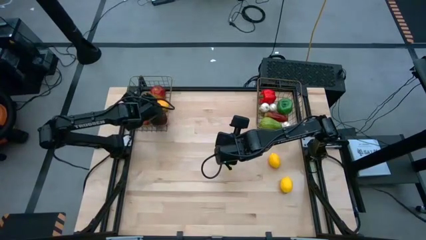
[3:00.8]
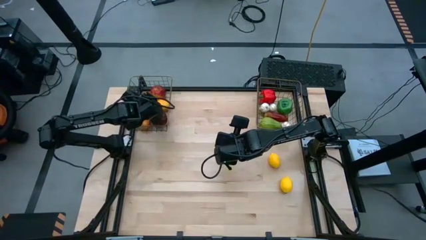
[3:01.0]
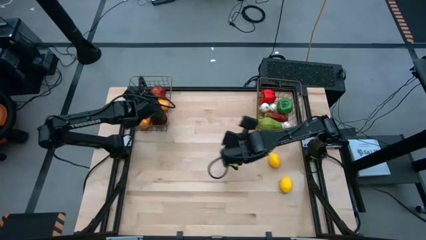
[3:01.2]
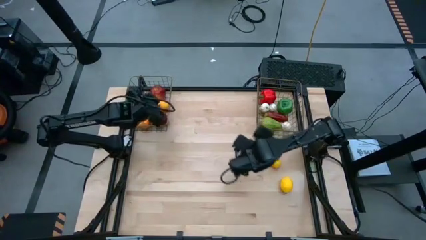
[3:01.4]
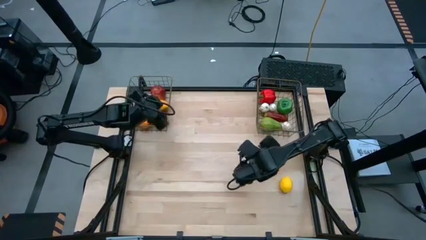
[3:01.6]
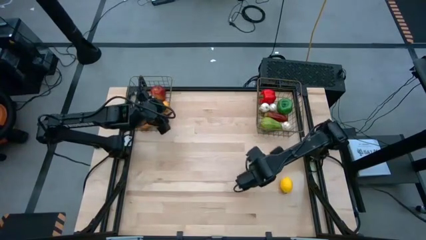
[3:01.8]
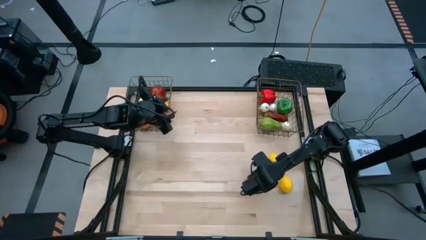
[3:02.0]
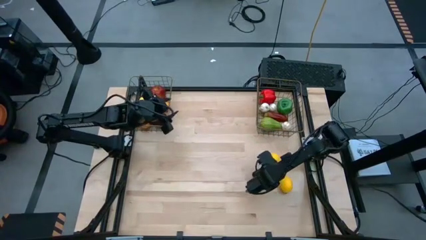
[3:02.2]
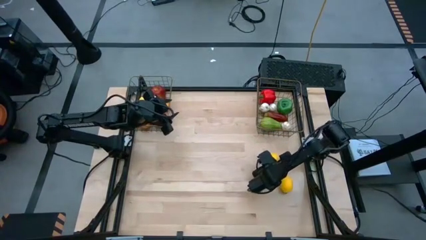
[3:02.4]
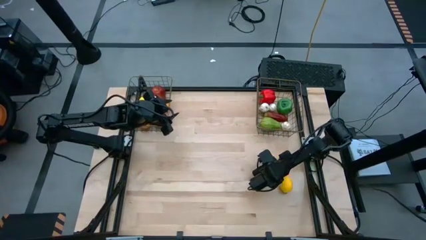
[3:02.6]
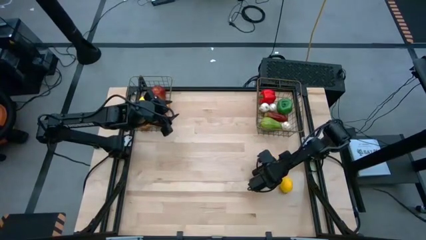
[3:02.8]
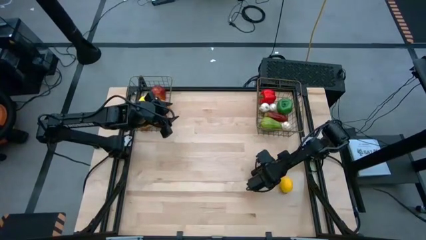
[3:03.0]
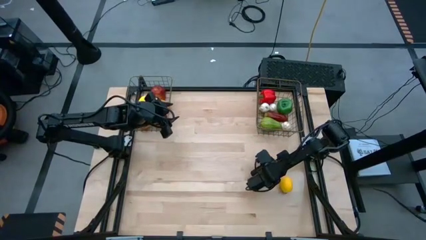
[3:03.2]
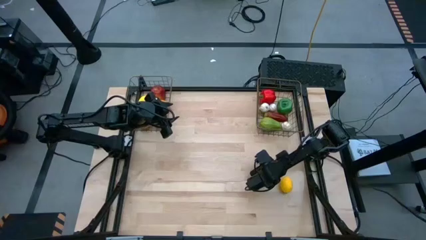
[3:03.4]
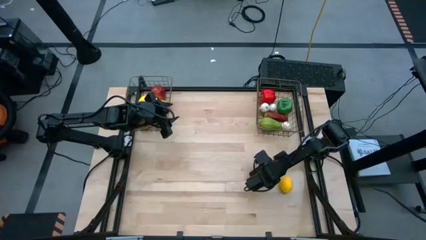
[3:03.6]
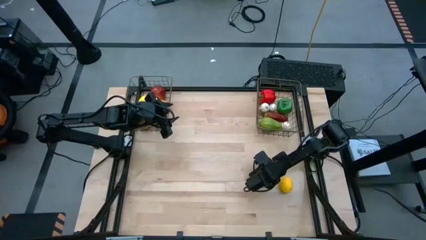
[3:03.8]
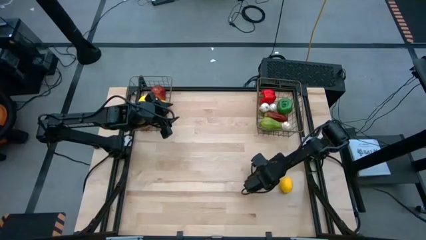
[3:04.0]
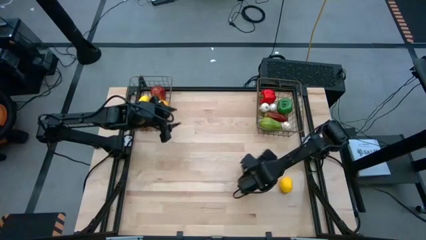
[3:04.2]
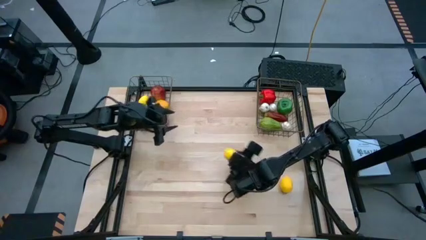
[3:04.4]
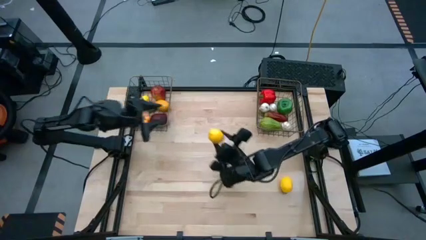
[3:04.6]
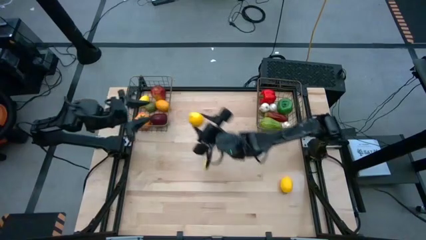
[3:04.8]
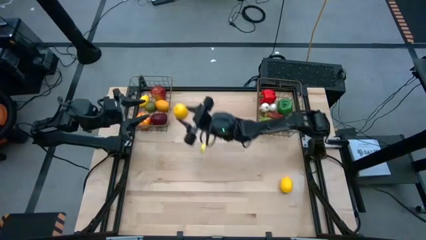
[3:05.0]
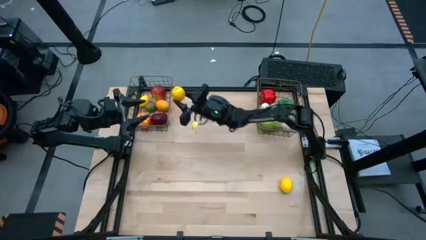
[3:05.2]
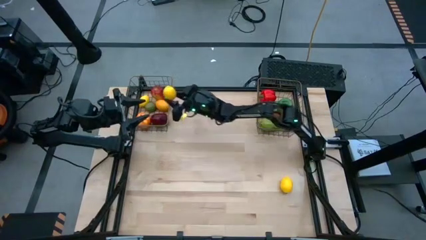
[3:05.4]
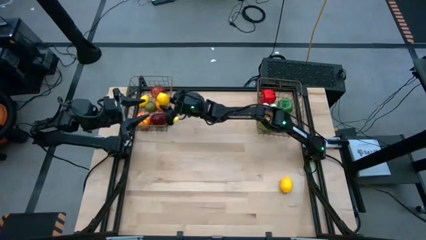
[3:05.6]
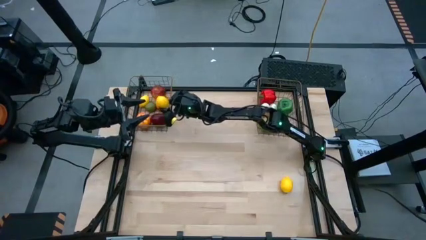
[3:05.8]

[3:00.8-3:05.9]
Task: Sort produce into baskets
Put the top lemon into the left wire basket

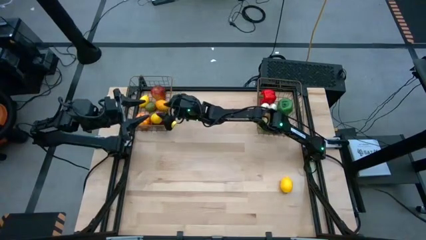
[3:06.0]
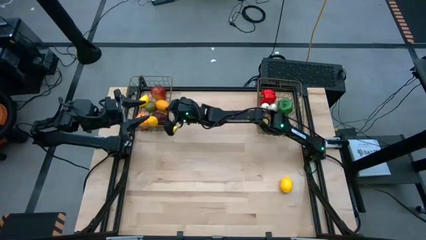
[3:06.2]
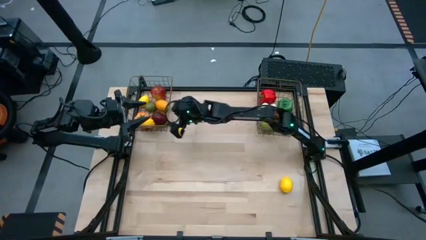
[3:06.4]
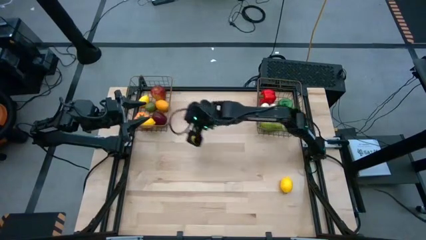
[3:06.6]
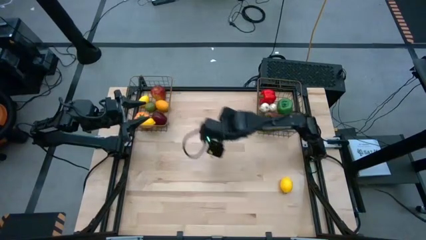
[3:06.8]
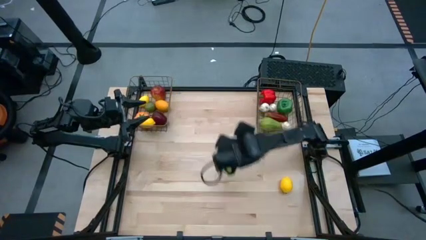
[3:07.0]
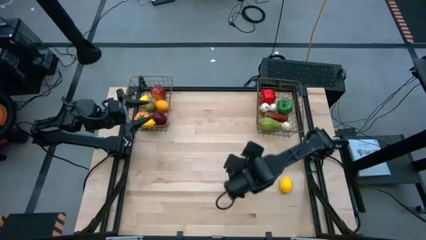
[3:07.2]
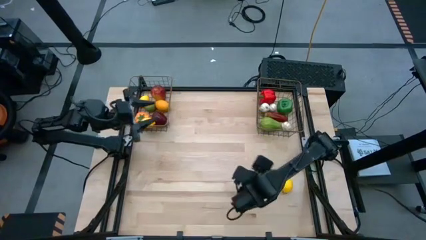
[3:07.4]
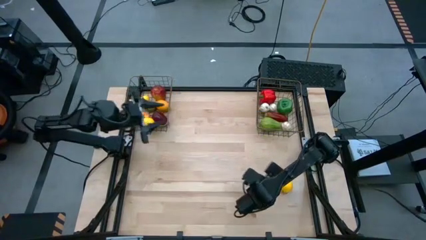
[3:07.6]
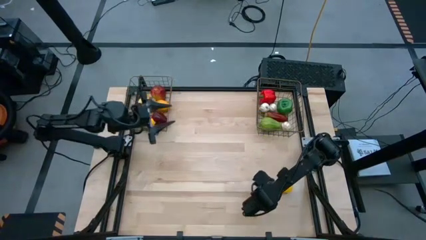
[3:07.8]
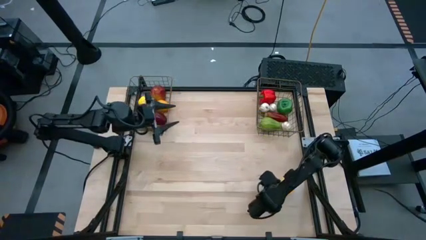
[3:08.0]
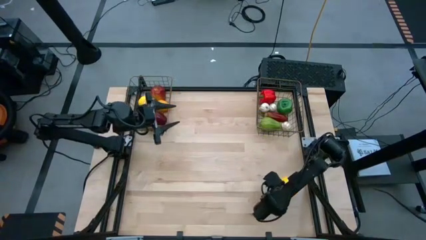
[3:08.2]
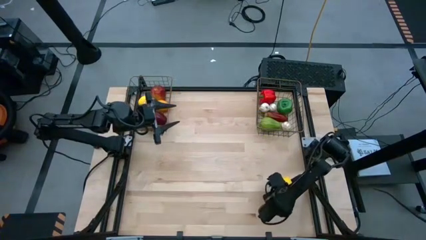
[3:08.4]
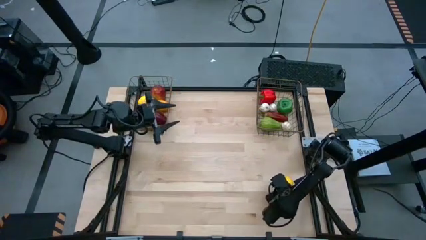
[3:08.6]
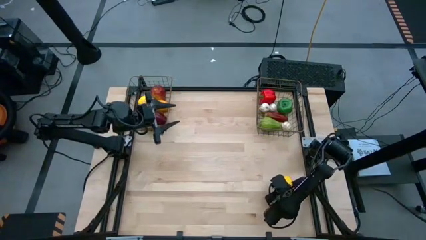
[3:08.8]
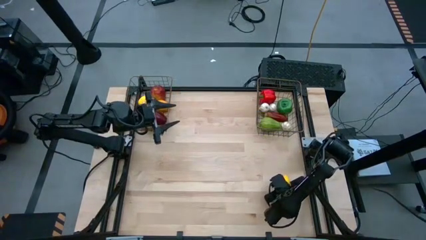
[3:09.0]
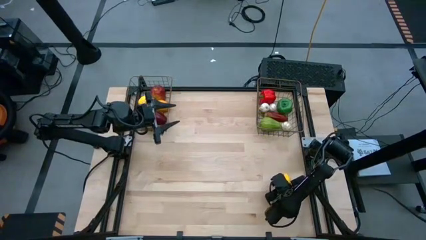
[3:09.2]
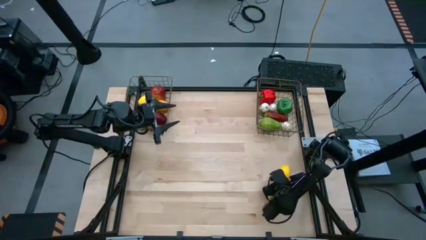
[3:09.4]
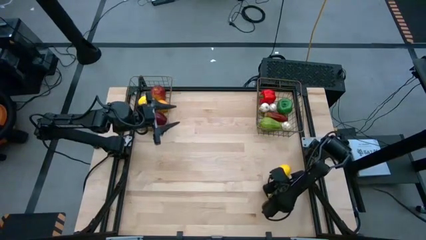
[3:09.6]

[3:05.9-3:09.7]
Put the lemon into the left wire basket

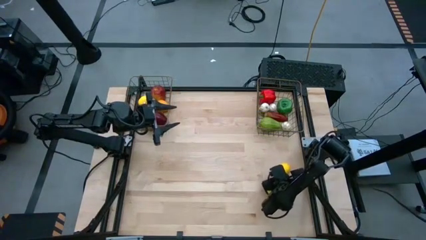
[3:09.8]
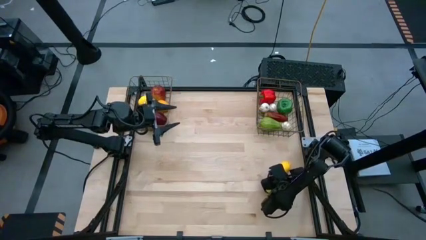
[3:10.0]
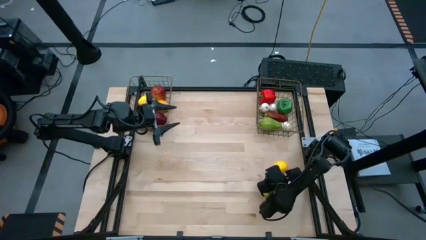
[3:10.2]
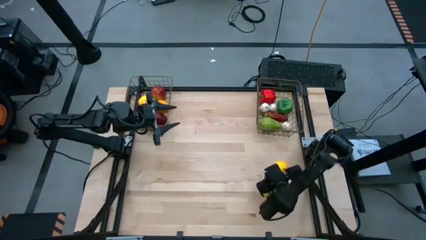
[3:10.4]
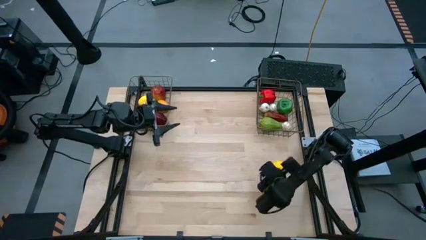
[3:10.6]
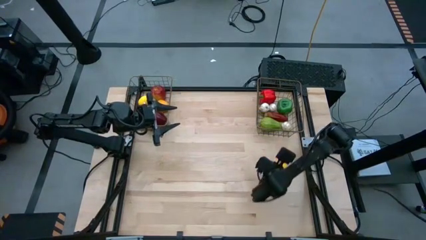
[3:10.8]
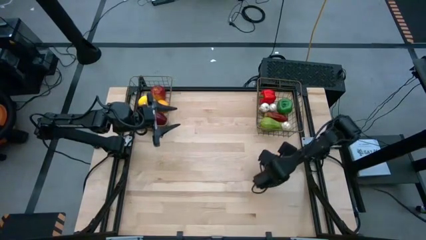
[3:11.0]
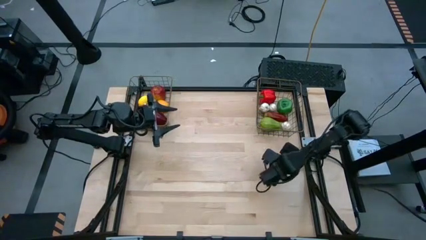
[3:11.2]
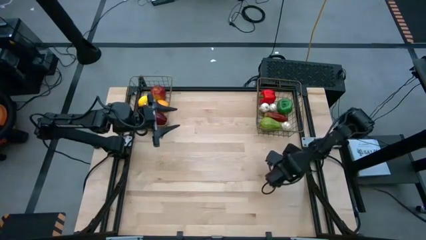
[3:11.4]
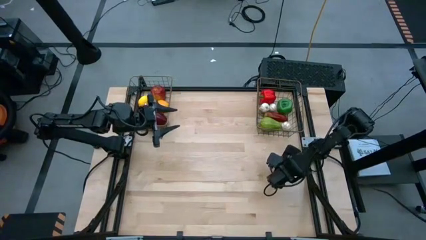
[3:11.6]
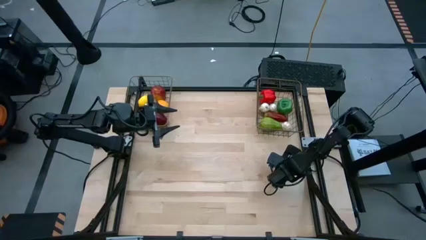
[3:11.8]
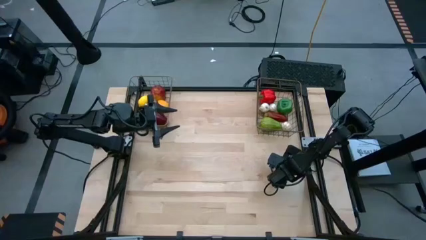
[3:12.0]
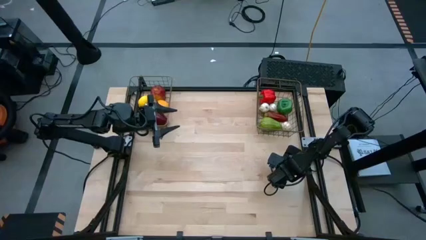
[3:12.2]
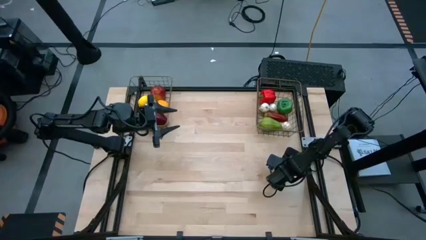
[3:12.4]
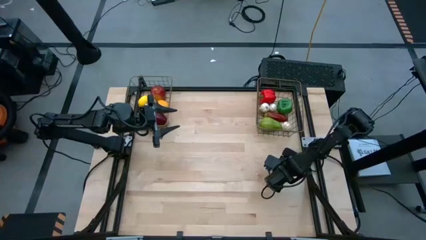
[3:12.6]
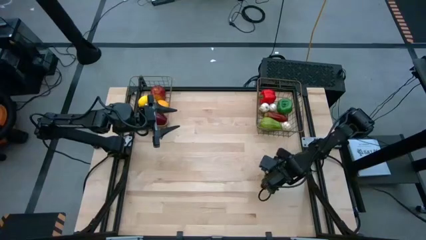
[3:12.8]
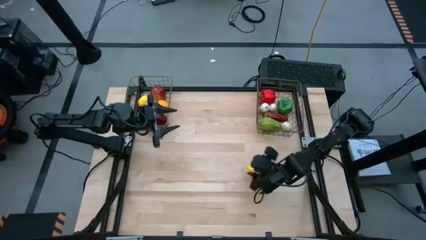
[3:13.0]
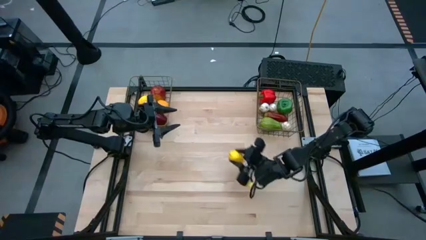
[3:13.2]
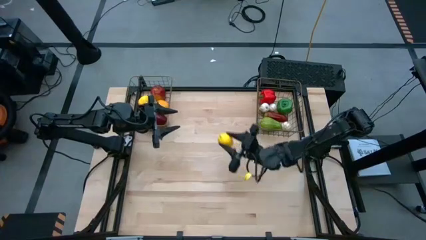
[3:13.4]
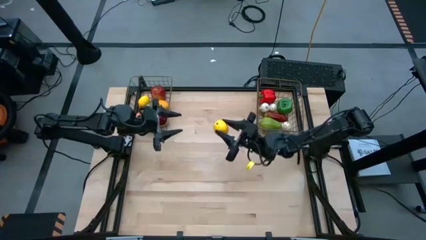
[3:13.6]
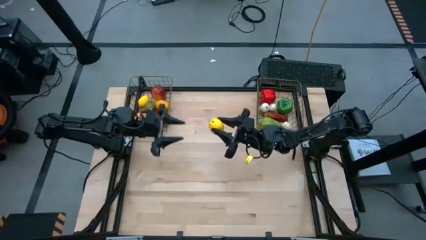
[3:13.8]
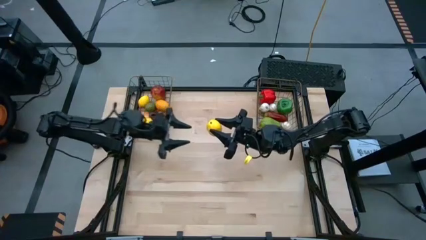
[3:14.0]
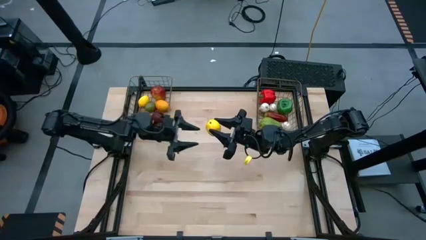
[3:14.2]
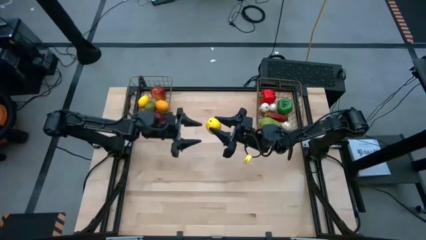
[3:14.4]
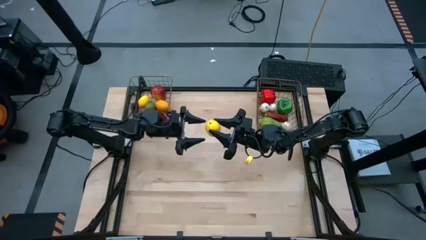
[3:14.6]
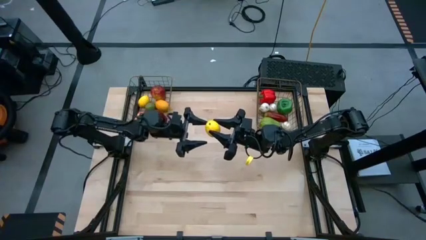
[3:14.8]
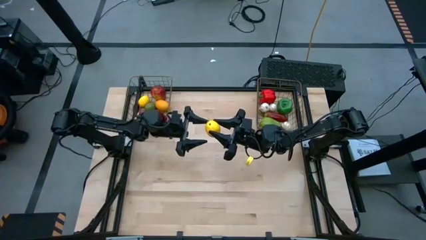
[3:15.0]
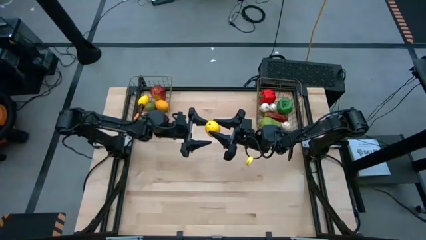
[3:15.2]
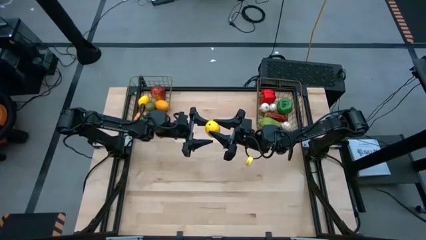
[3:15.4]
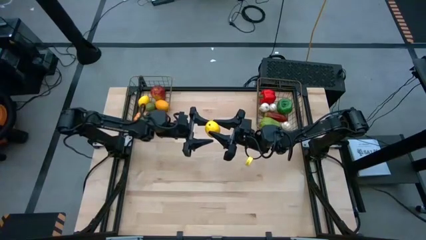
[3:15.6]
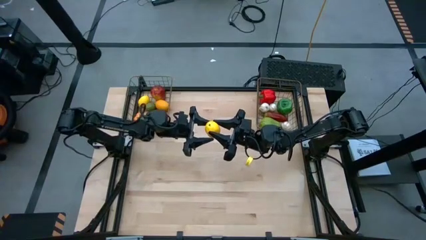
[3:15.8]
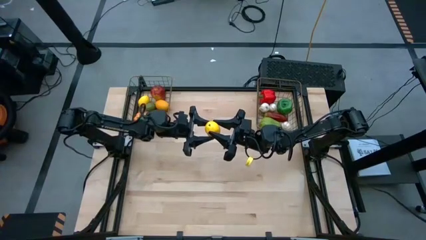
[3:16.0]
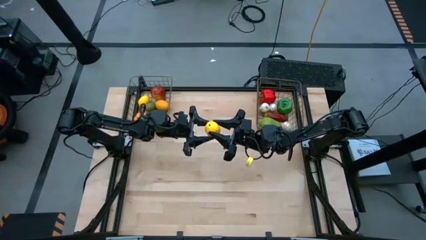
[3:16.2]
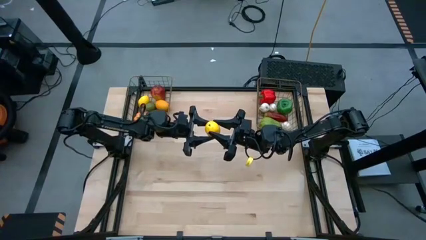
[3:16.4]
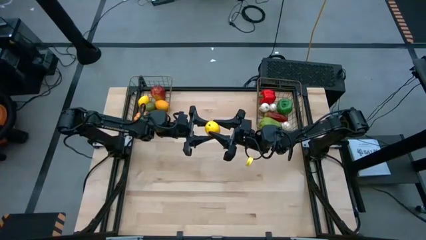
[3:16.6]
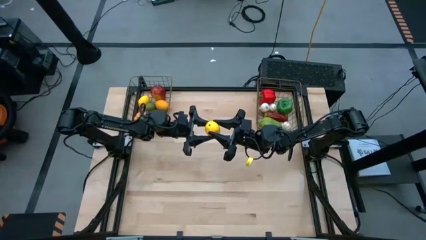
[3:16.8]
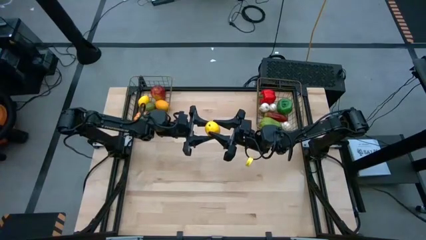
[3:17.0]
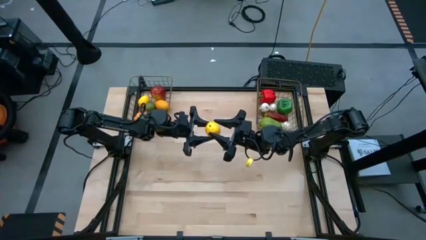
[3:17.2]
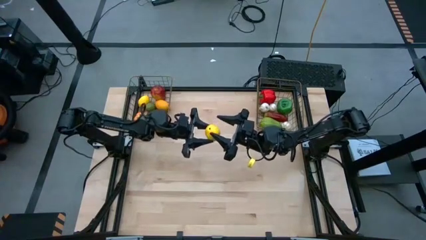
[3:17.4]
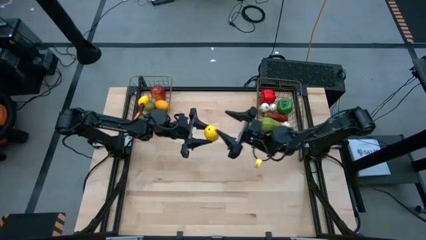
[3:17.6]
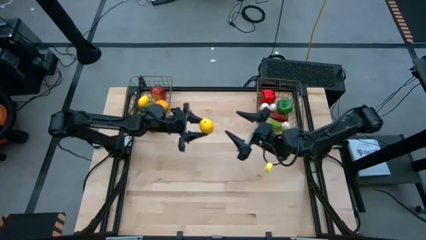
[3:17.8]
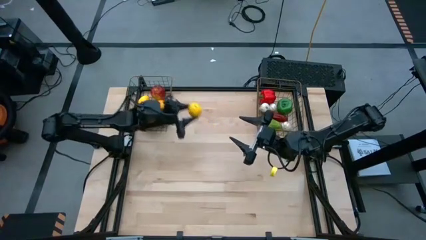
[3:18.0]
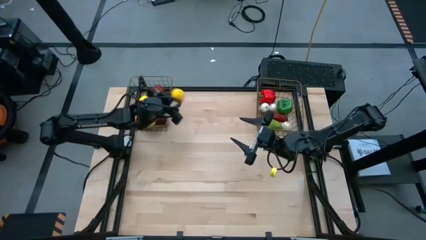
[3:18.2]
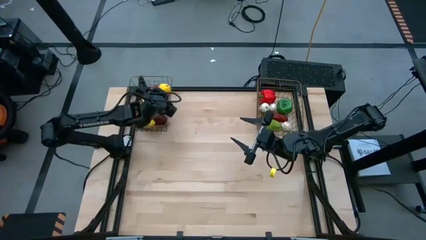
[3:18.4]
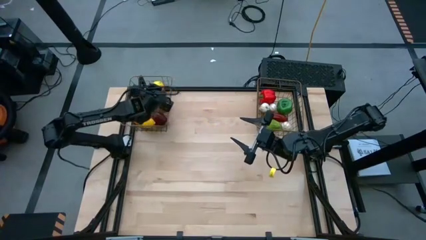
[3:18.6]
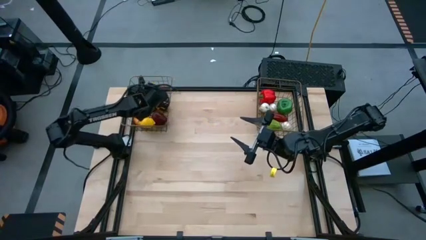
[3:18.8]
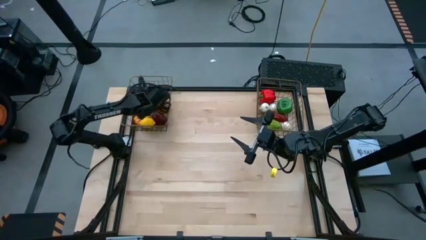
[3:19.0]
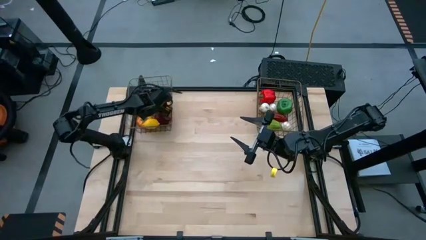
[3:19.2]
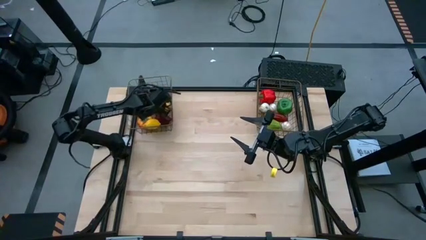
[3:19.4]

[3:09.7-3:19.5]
Put the lemon into the left wire basket
